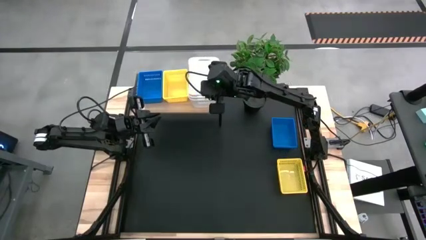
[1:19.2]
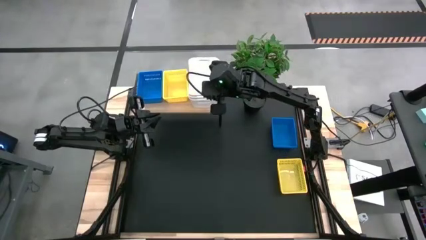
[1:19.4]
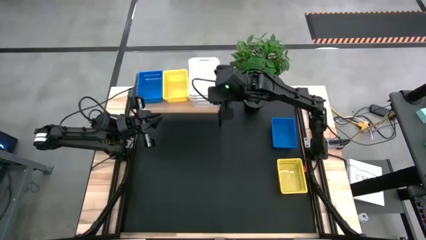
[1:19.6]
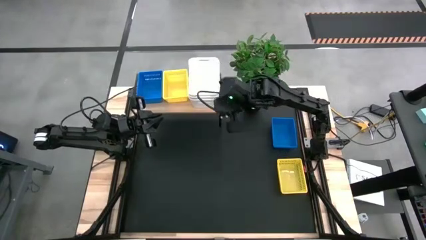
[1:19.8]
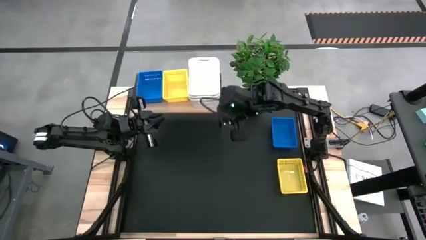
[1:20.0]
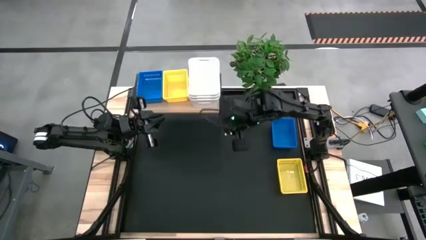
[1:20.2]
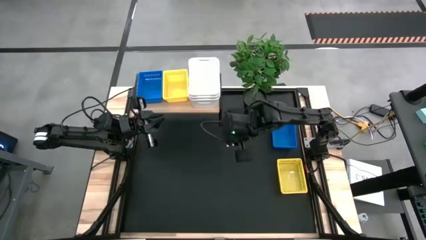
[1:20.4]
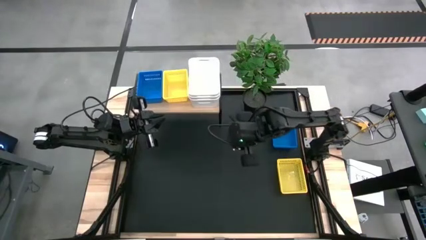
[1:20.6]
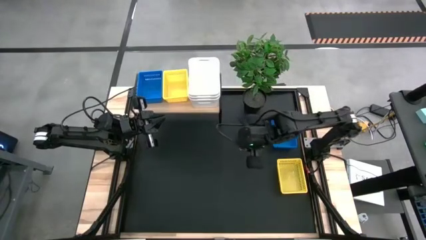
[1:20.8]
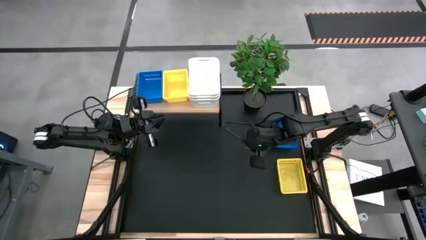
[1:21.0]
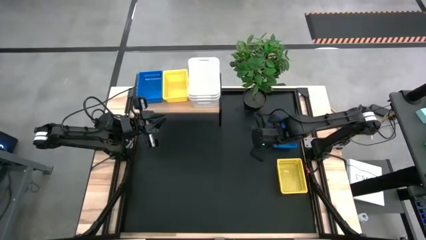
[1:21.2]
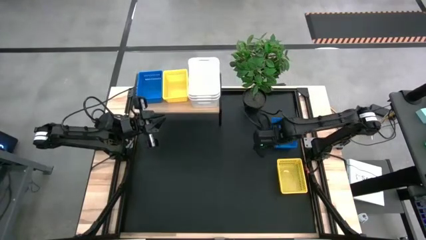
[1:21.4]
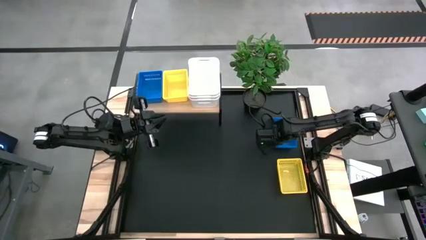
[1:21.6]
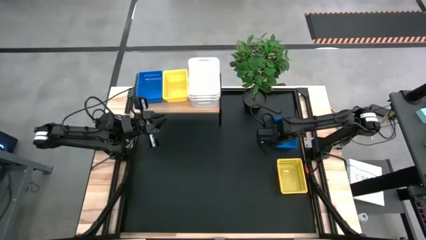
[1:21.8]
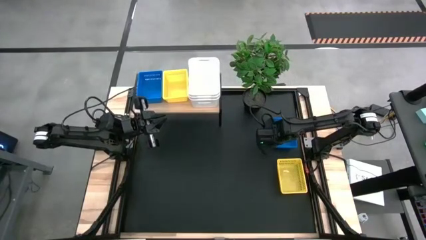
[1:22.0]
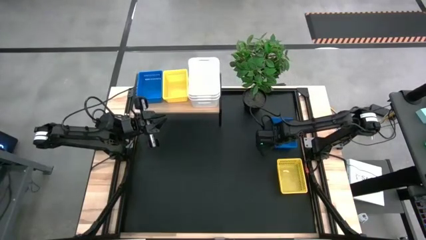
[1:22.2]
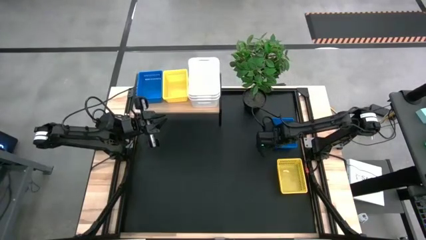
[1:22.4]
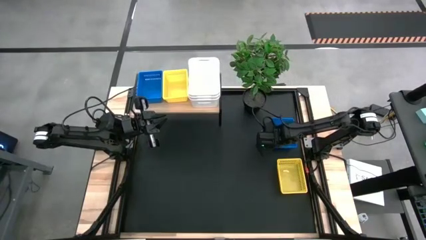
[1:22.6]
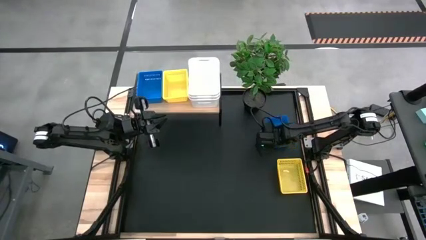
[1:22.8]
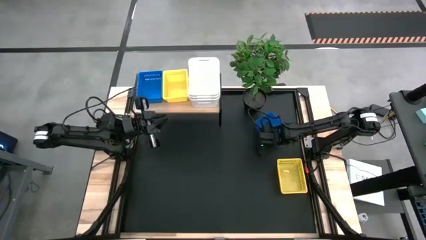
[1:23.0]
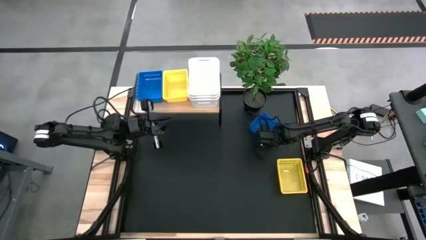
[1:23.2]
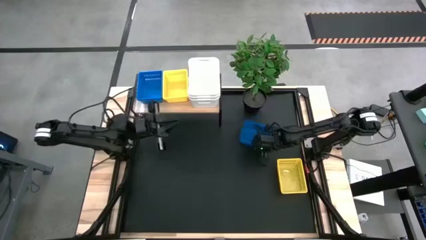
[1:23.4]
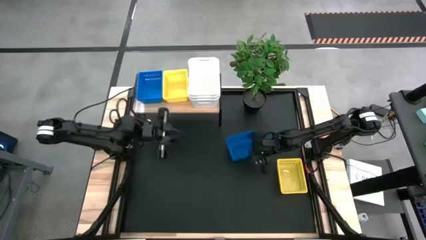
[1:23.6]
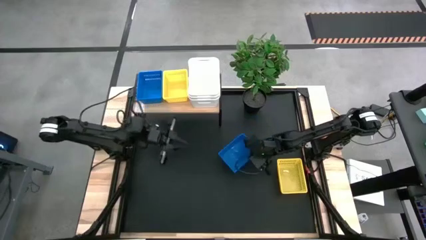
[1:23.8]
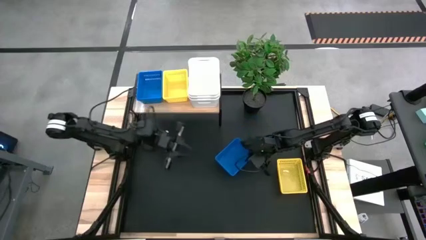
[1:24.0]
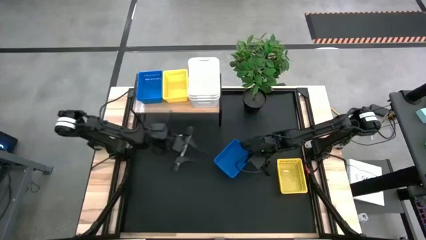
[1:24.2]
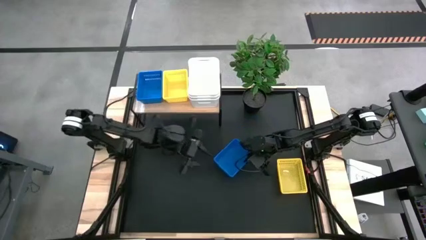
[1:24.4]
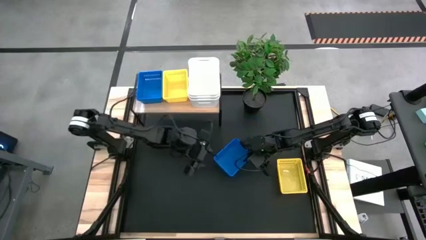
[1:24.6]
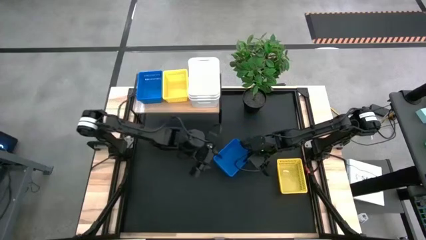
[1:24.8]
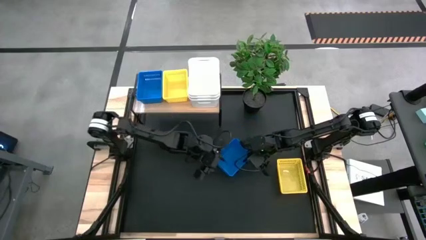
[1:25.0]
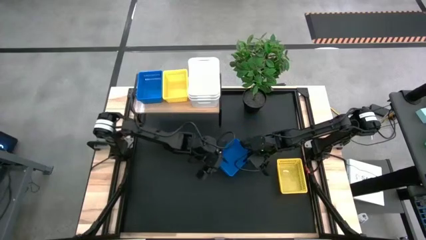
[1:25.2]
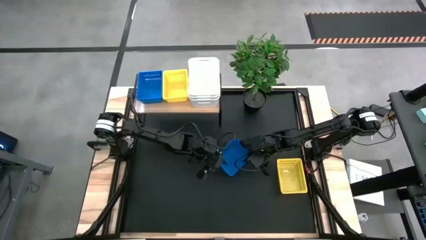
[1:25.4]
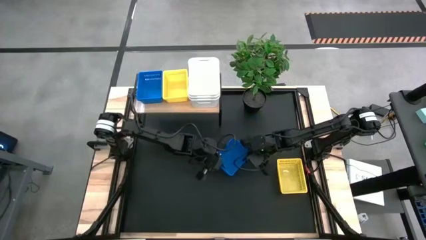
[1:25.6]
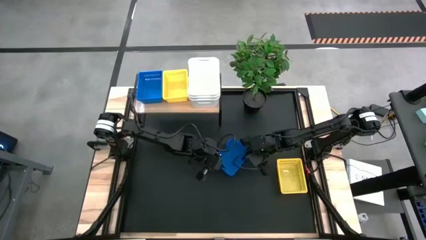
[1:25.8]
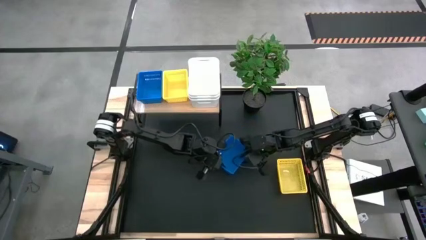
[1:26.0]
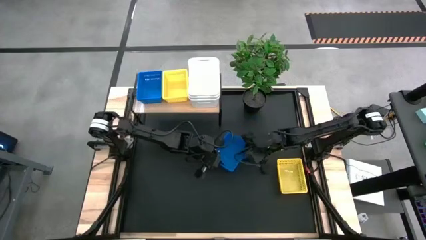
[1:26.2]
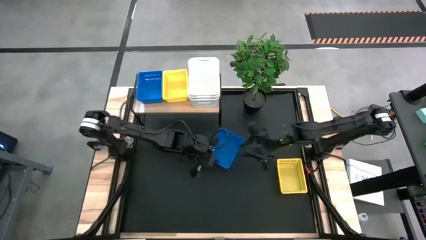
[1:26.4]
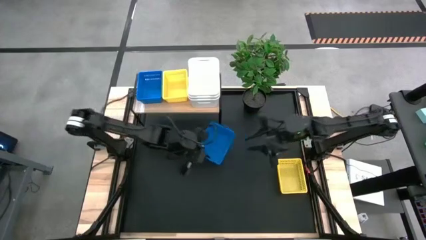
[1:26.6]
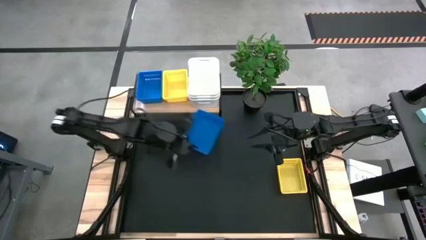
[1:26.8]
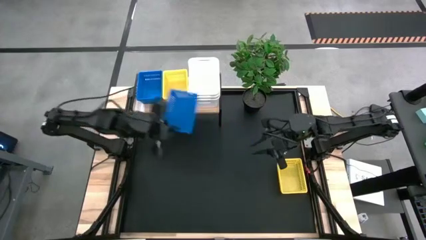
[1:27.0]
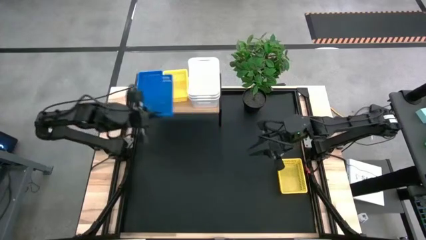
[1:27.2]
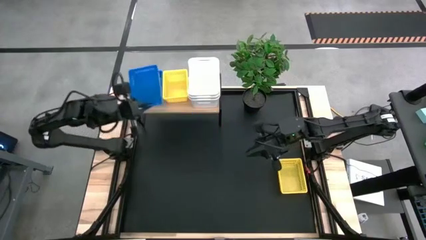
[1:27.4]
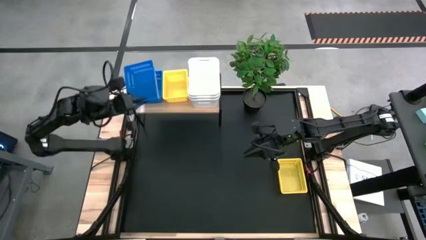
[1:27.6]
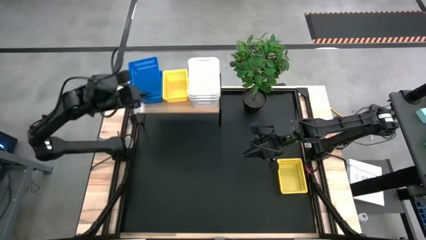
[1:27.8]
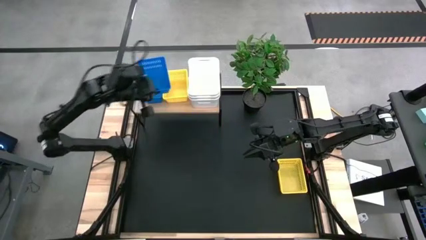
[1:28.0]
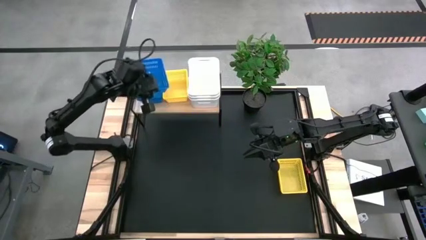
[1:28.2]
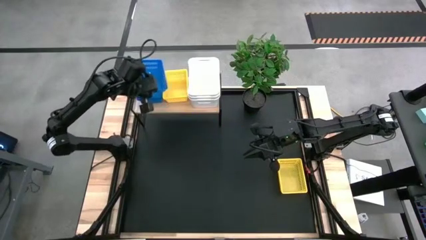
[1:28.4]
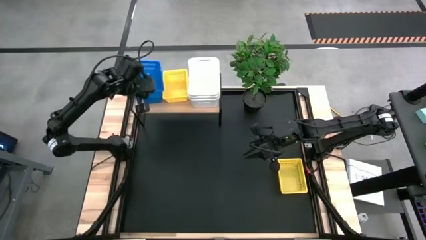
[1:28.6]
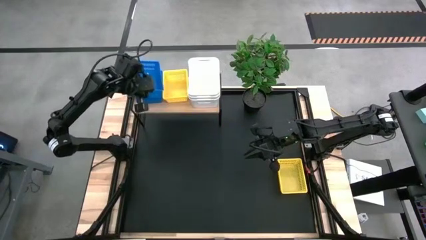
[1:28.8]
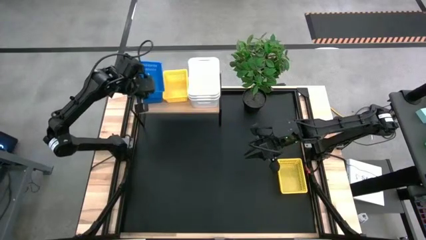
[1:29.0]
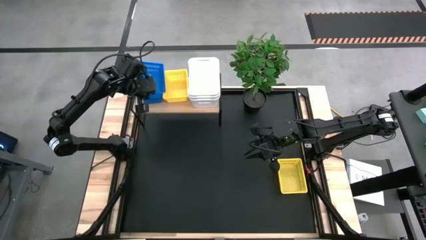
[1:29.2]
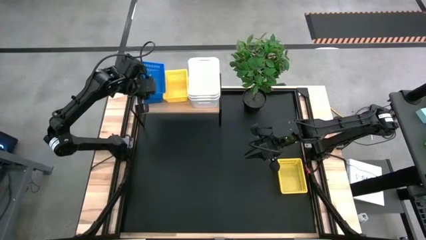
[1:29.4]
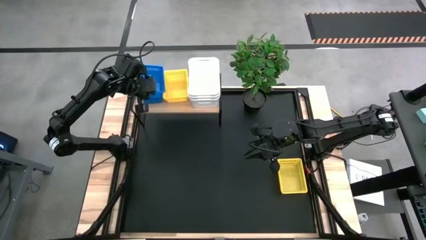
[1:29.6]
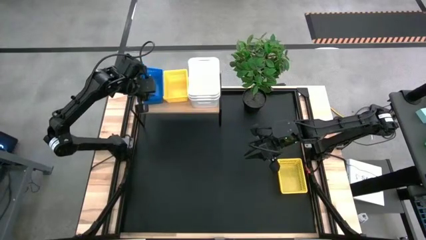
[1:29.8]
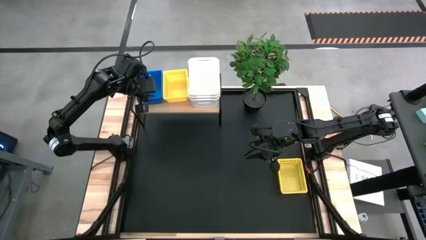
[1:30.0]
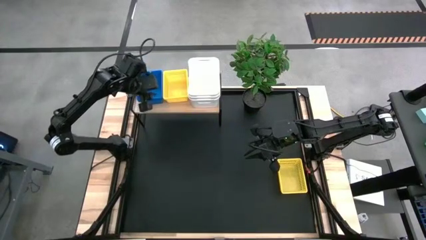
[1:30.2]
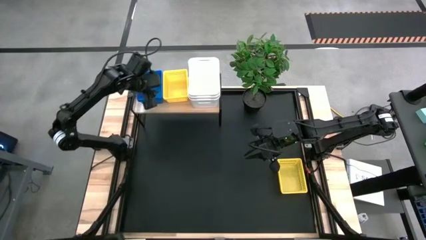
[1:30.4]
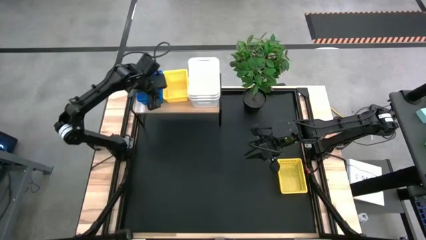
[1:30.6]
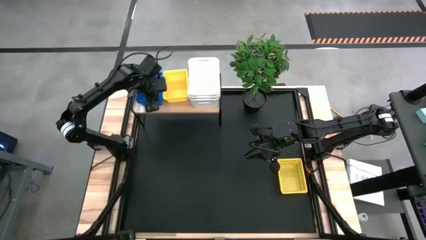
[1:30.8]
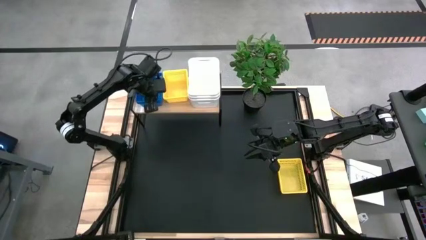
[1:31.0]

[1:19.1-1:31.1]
Task: Stack baskets on shelf by color
Stack the blue bin into the blue bin on the shelf

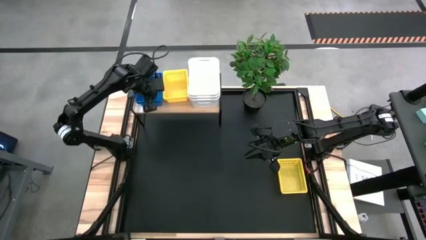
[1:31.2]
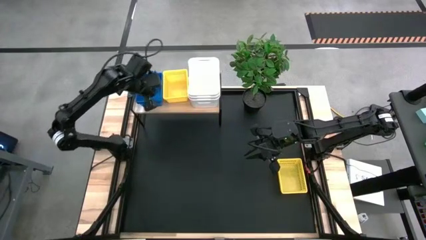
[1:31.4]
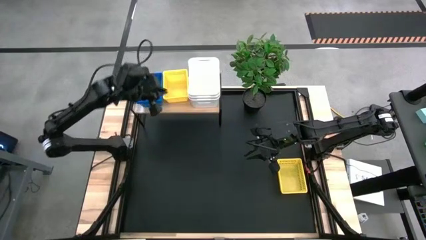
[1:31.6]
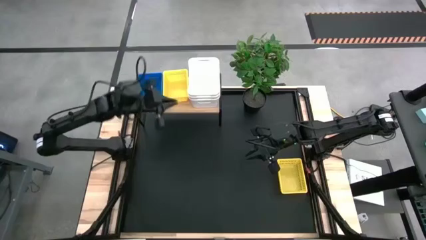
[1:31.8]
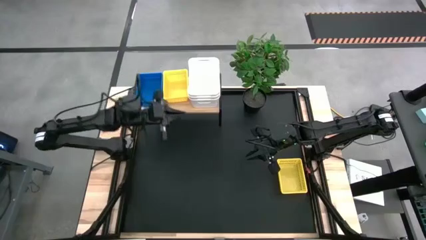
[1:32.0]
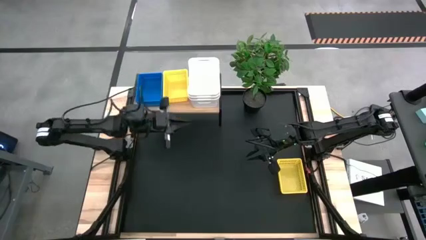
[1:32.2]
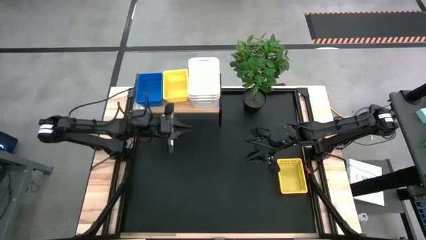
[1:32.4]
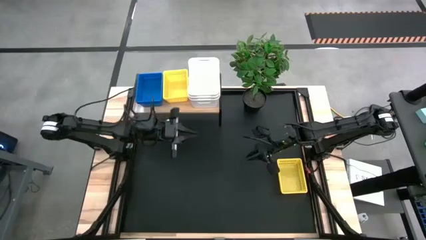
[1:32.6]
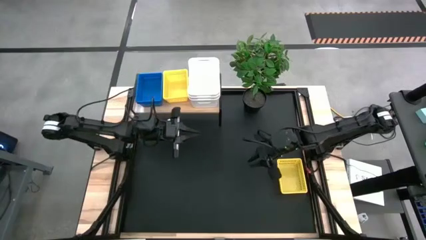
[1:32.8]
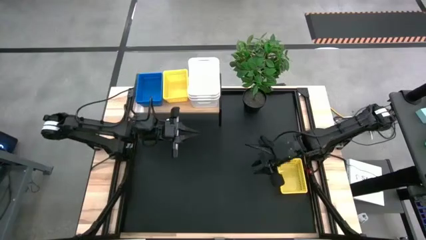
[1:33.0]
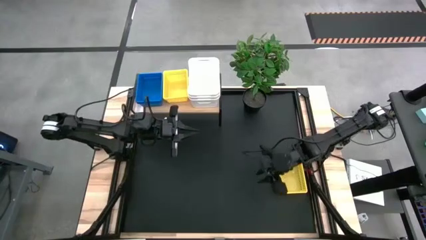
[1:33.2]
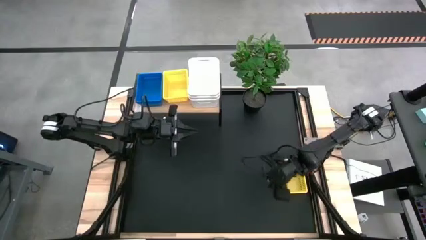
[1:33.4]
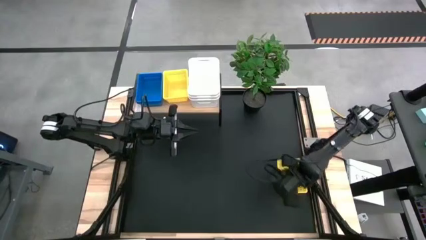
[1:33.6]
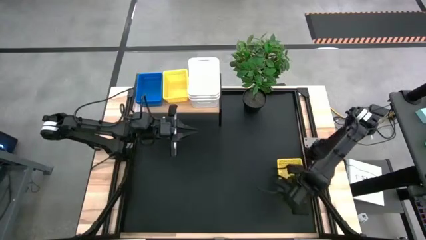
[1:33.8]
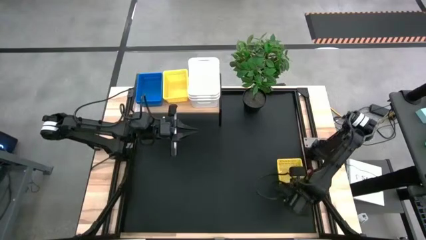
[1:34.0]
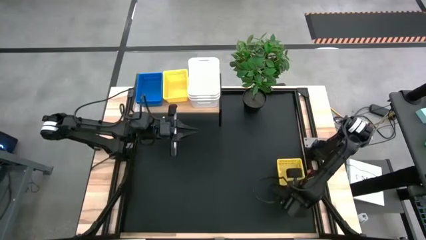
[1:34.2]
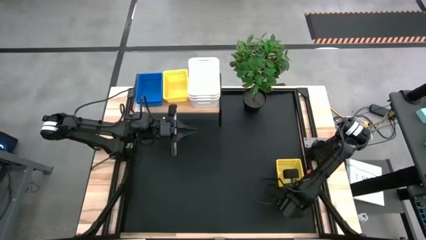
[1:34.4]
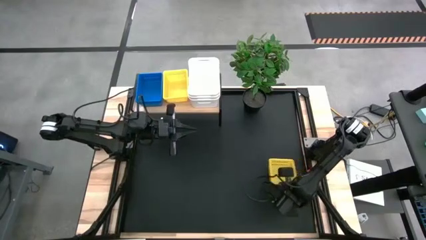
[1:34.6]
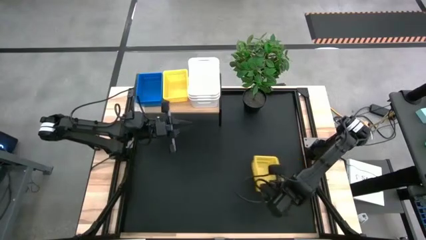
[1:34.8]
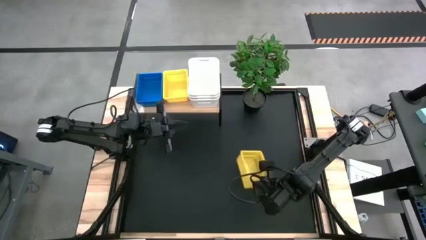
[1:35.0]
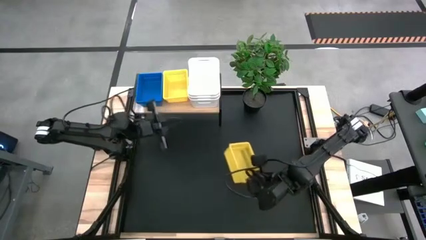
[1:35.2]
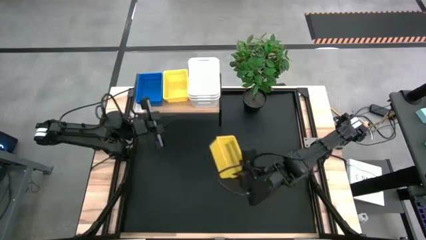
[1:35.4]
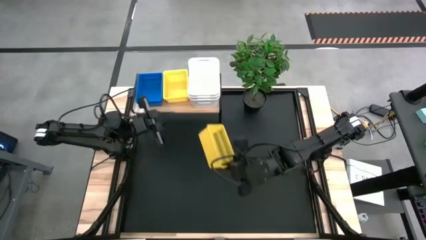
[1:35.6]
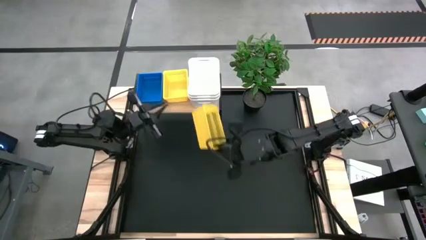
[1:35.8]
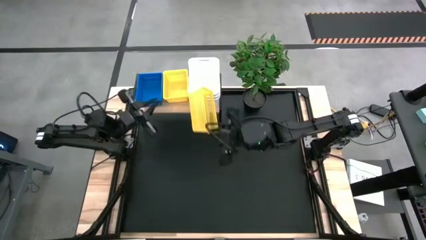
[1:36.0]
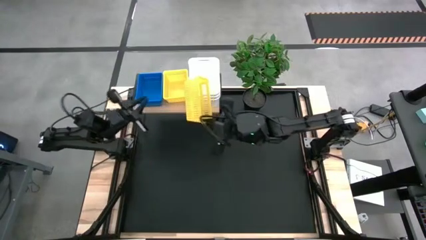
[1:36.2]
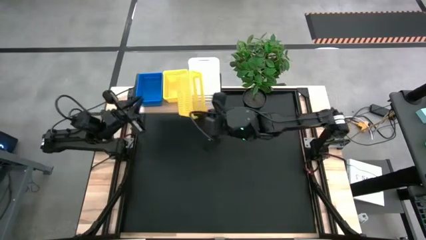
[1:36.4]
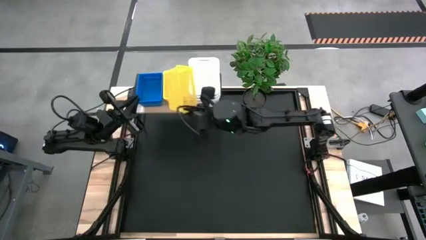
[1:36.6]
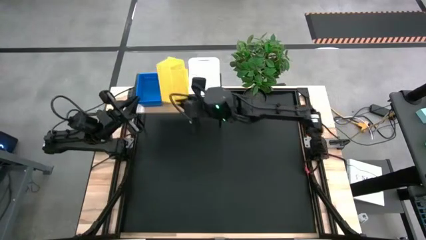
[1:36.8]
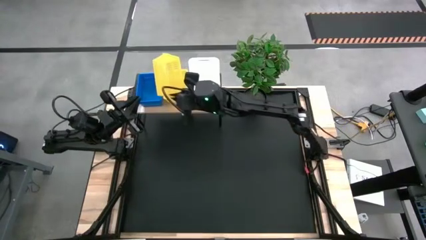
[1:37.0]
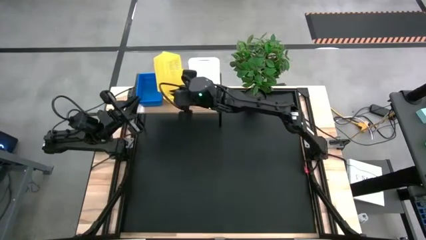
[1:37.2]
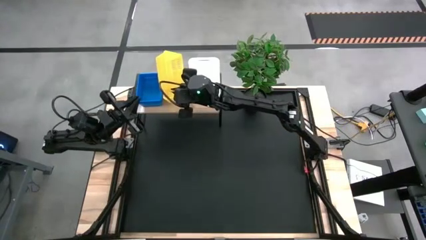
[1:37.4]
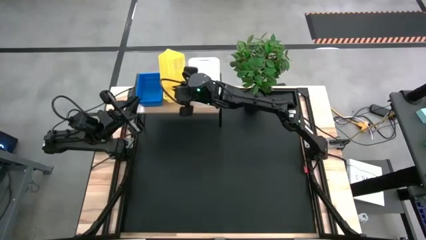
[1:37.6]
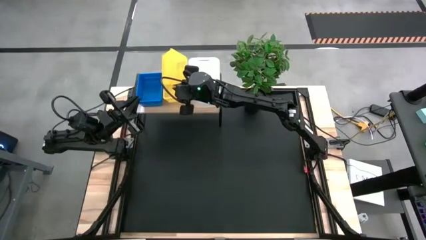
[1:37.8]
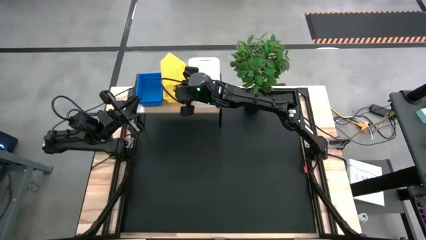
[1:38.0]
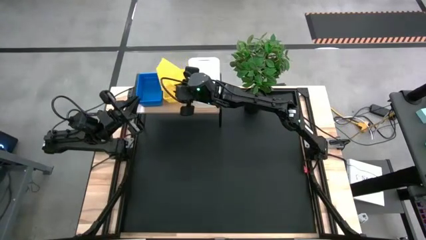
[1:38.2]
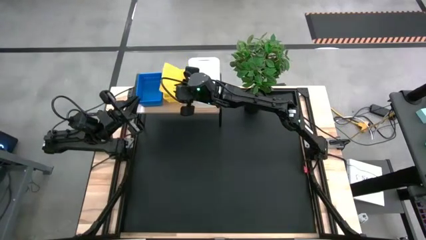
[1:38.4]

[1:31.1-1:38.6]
Stack the yellow bin into the yellow bin on the shelf
